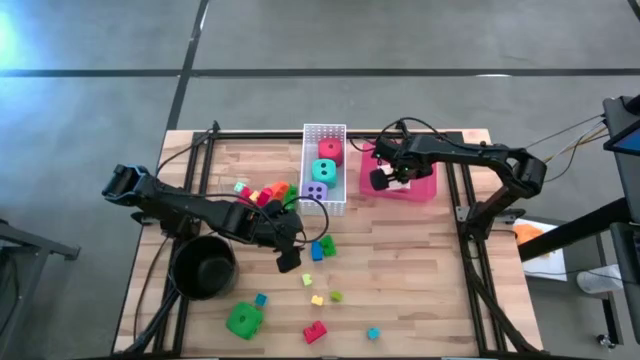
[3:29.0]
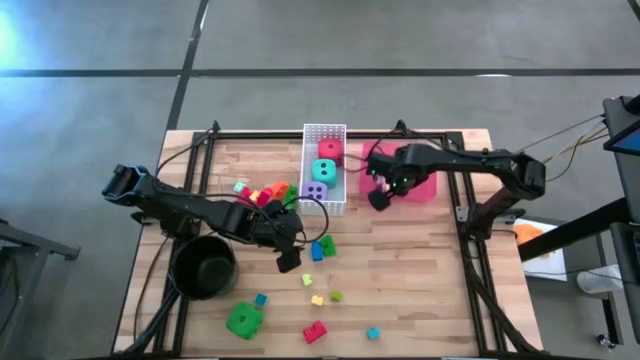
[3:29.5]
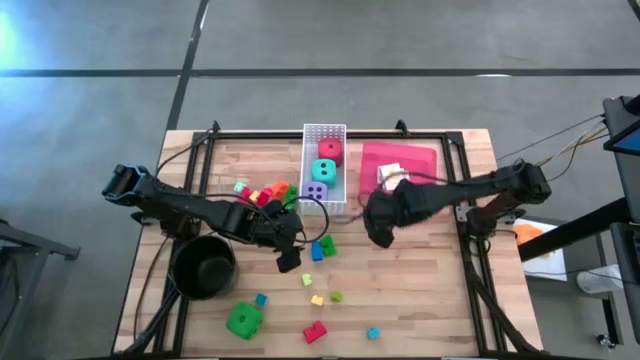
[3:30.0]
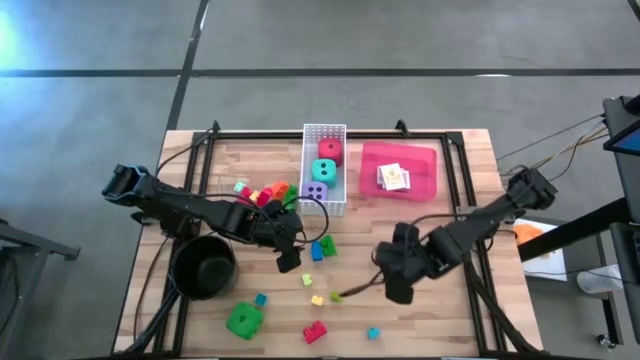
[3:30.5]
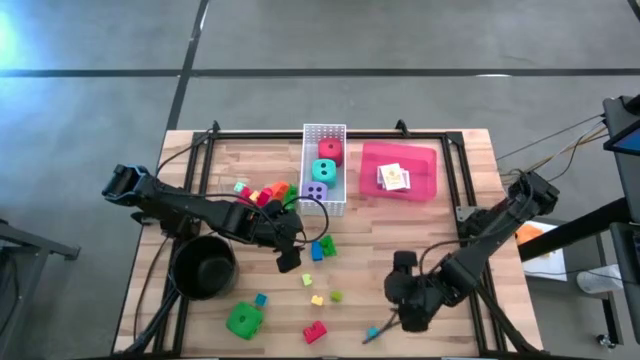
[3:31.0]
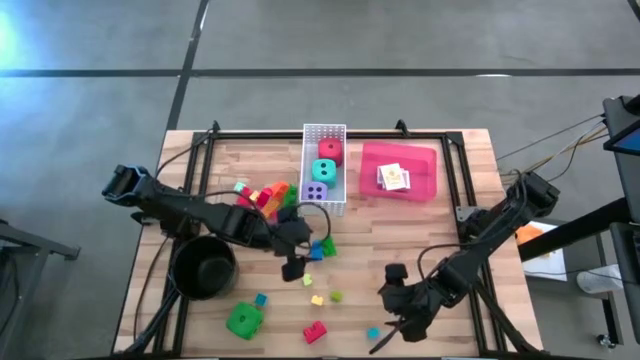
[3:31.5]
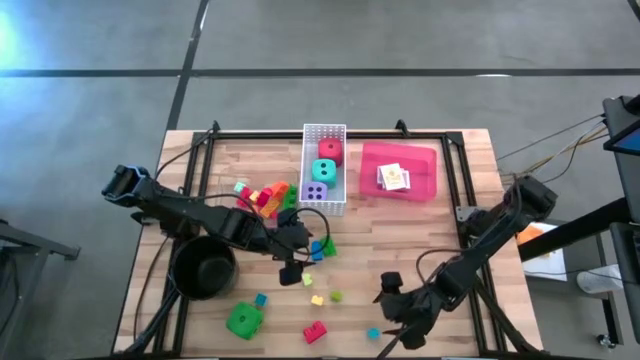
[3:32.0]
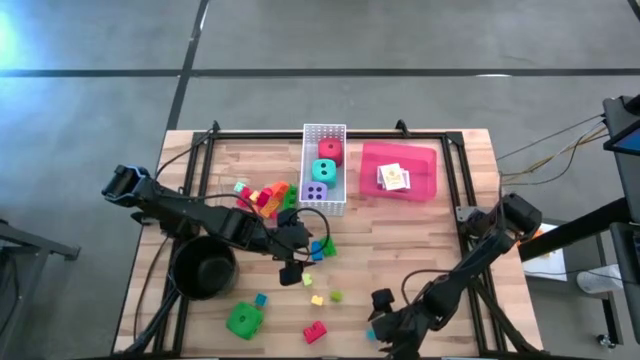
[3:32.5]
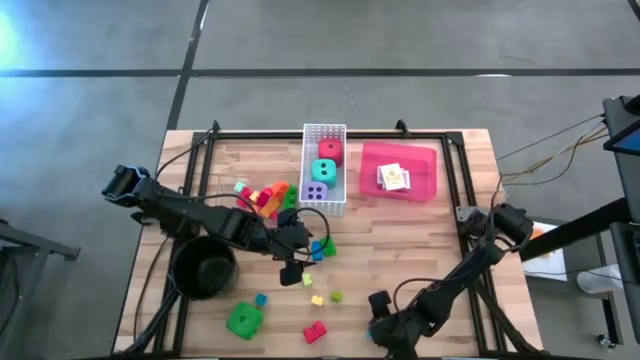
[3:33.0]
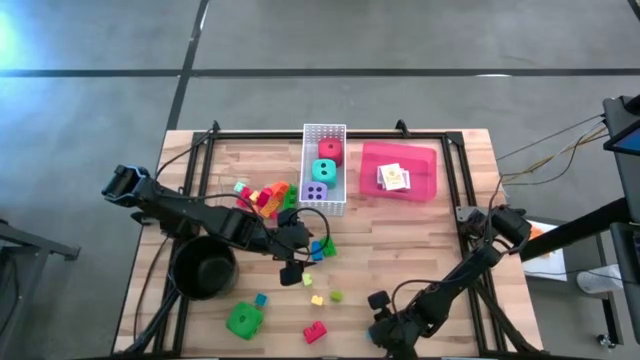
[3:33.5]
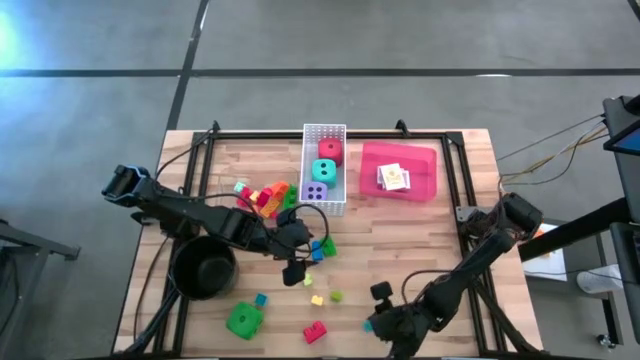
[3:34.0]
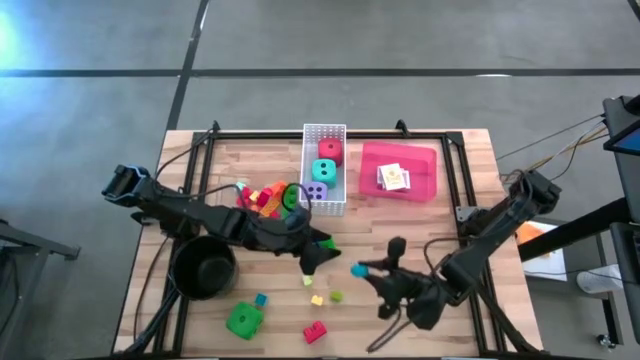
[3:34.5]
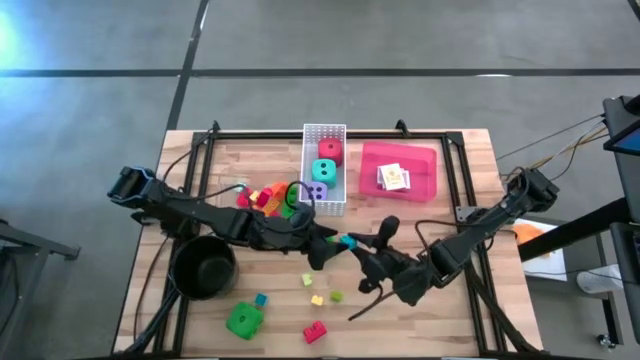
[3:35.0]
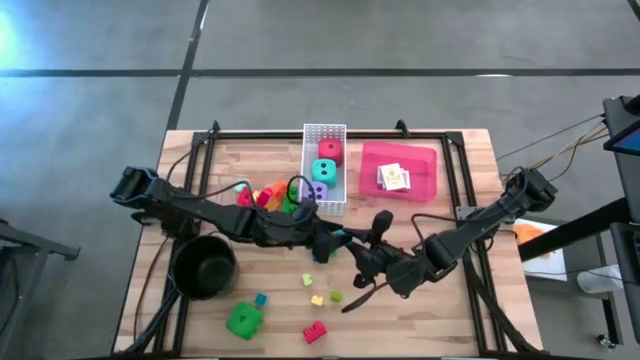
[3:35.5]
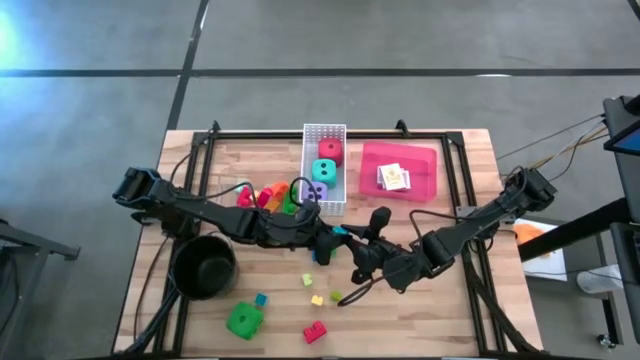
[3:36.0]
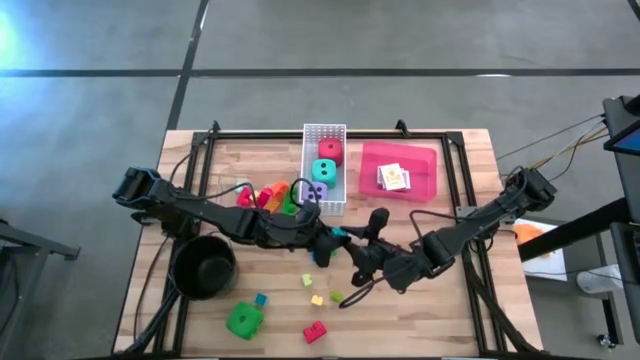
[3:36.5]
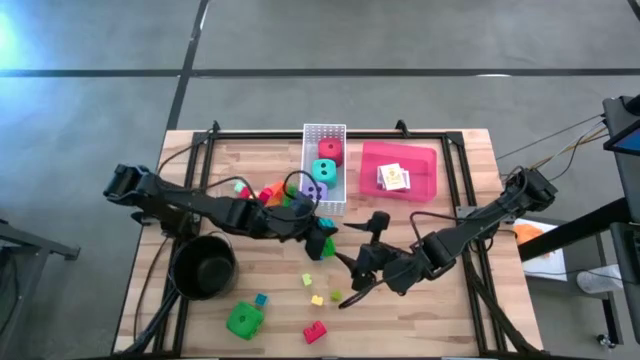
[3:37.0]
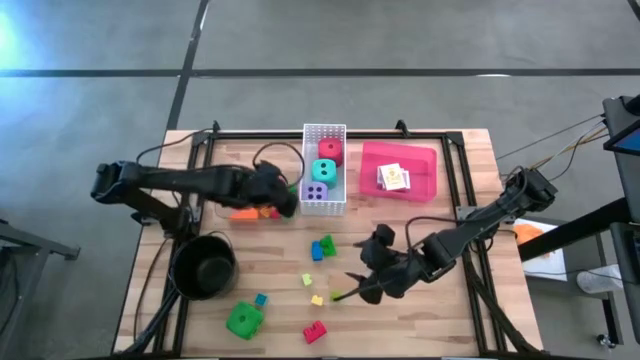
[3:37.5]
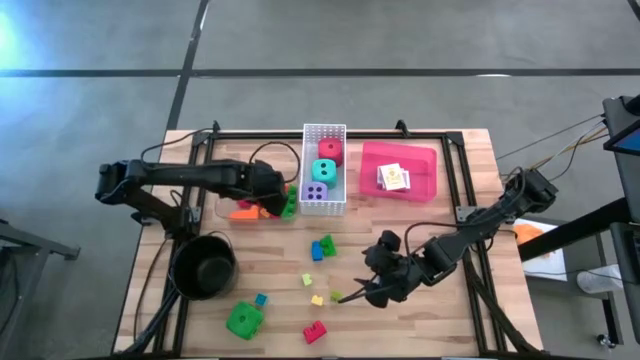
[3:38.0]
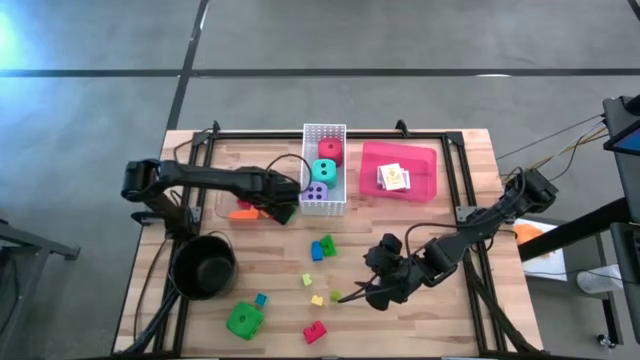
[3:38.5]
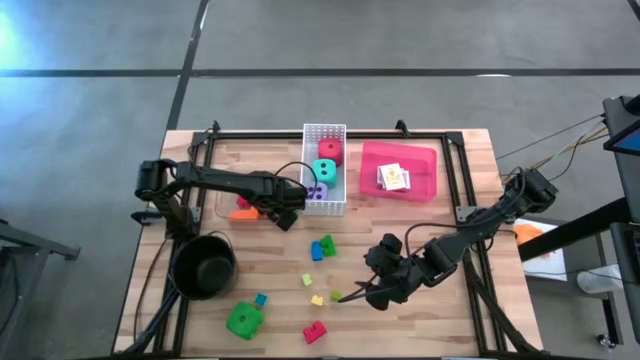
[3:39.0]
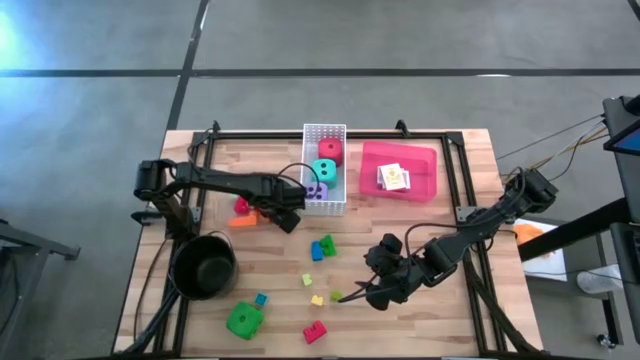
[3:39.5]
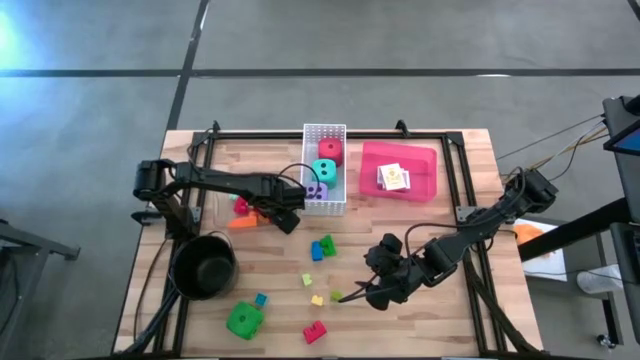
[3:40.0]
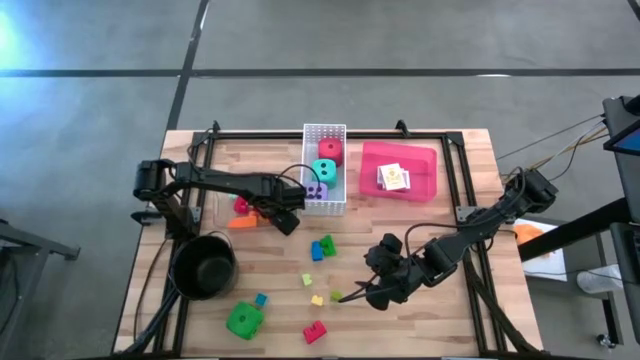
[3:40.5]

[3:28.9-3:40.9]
Task: Pick & Place Toys
Put the light blue game piece into the transparent bin

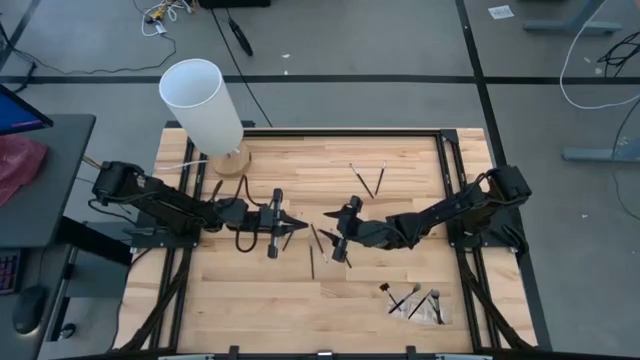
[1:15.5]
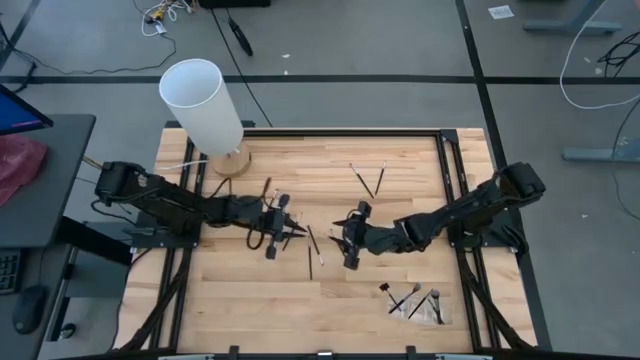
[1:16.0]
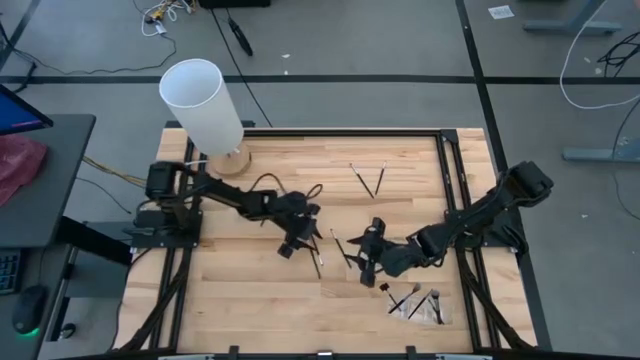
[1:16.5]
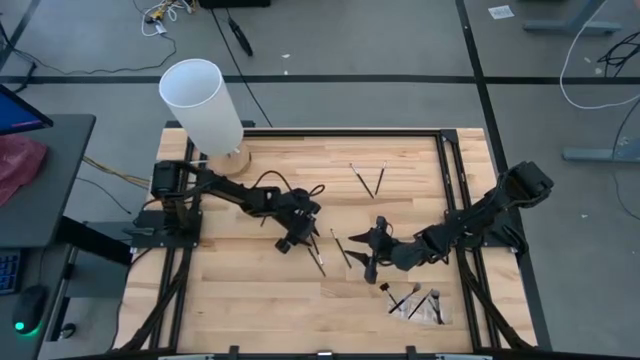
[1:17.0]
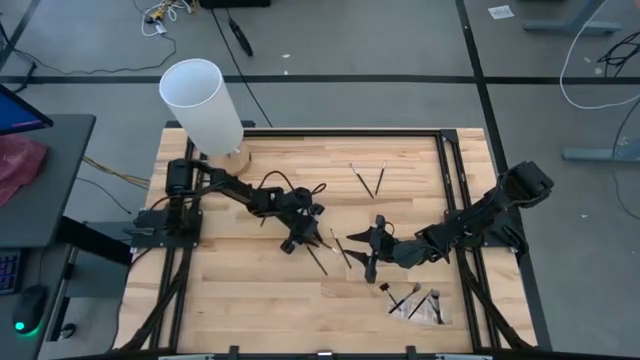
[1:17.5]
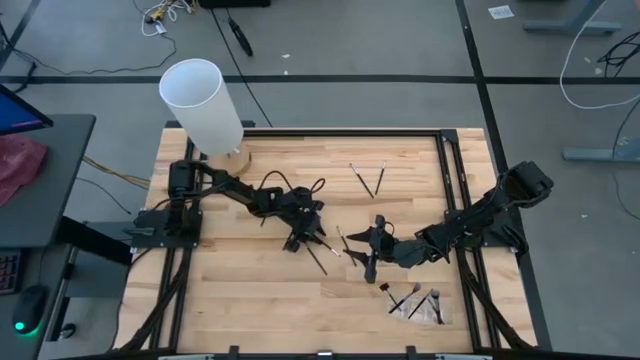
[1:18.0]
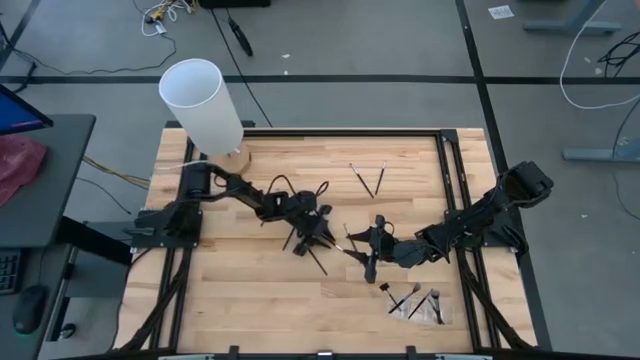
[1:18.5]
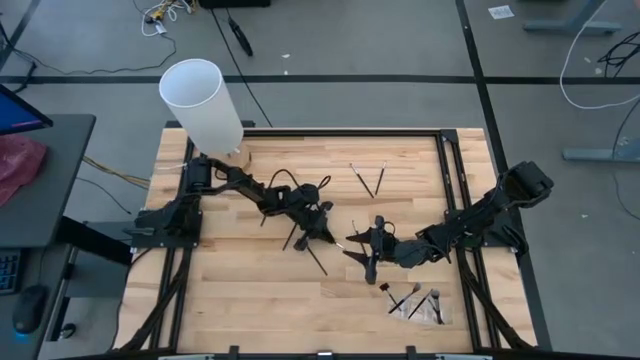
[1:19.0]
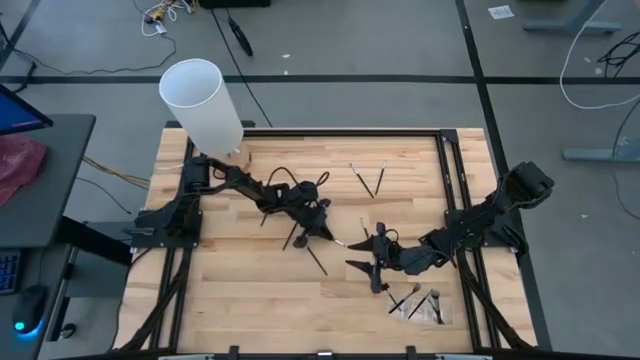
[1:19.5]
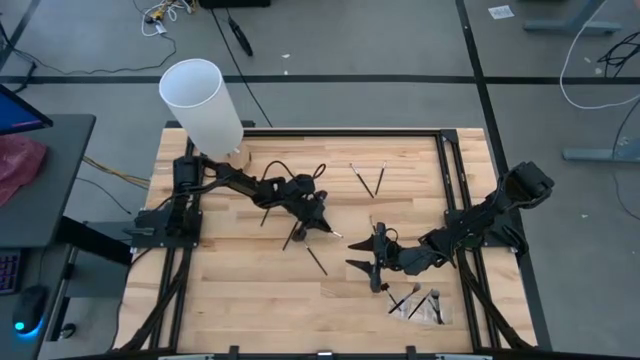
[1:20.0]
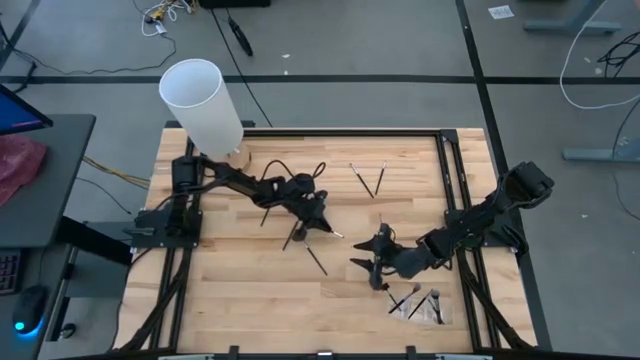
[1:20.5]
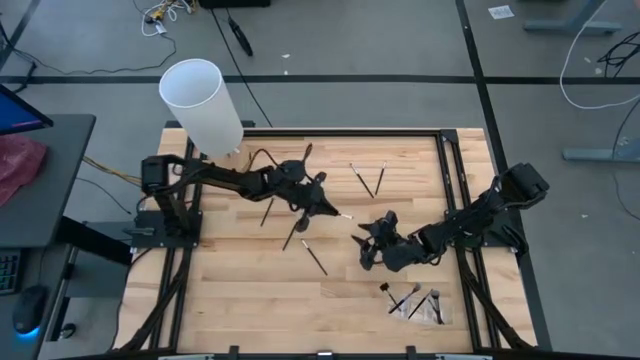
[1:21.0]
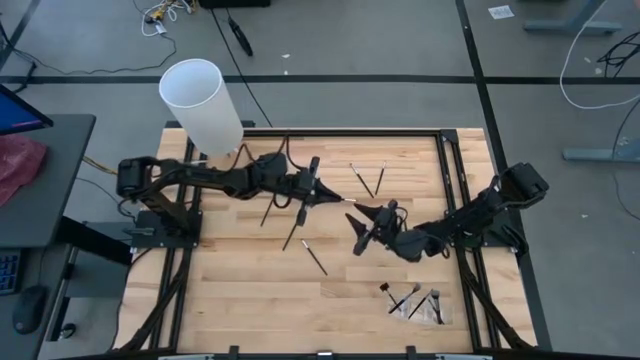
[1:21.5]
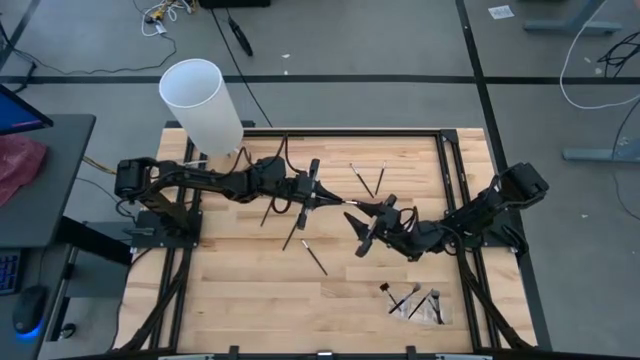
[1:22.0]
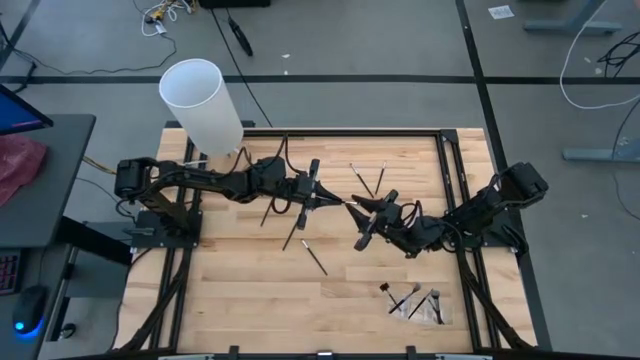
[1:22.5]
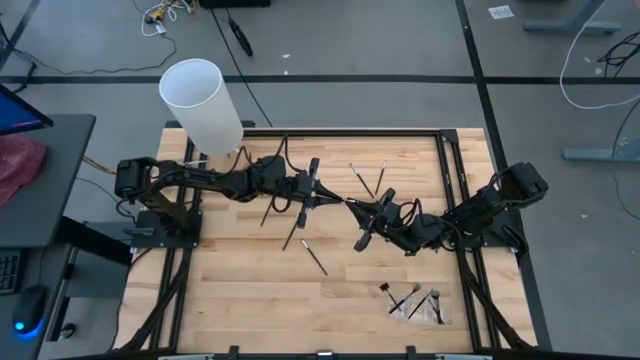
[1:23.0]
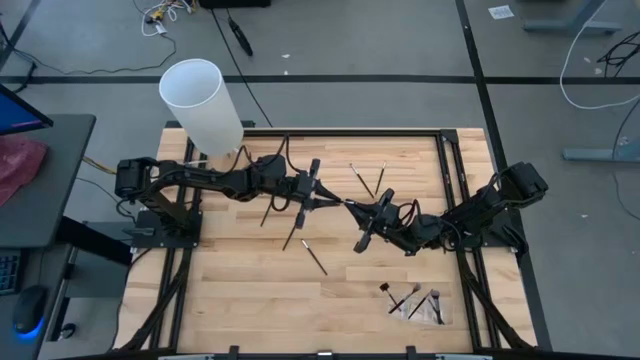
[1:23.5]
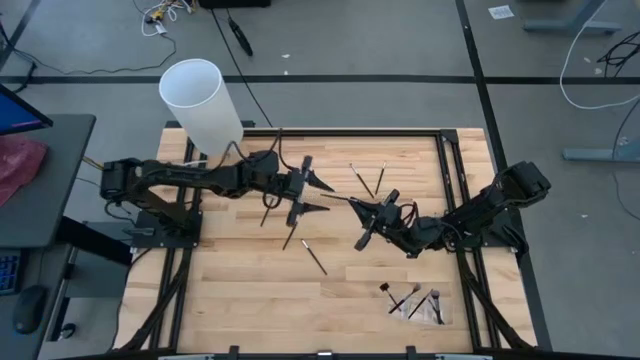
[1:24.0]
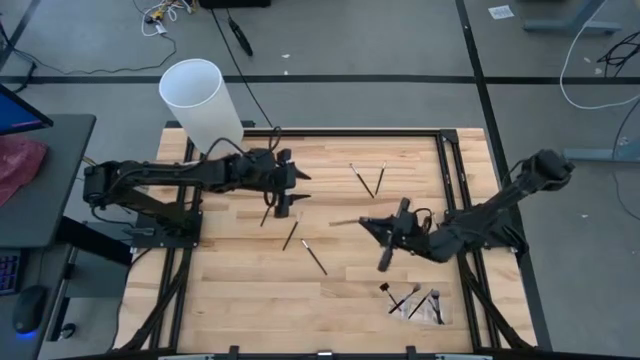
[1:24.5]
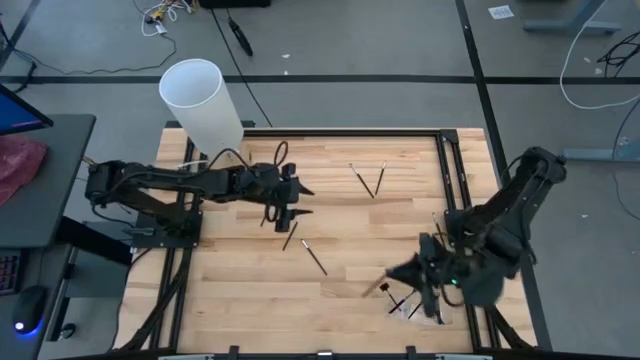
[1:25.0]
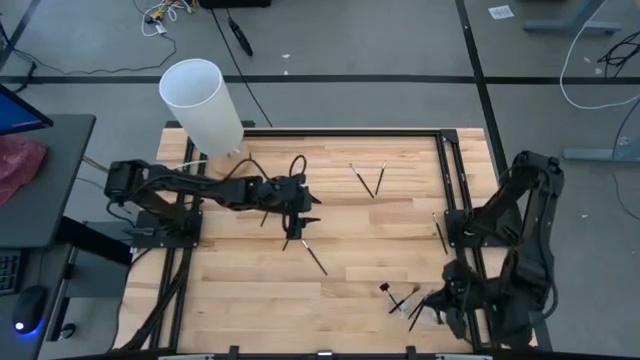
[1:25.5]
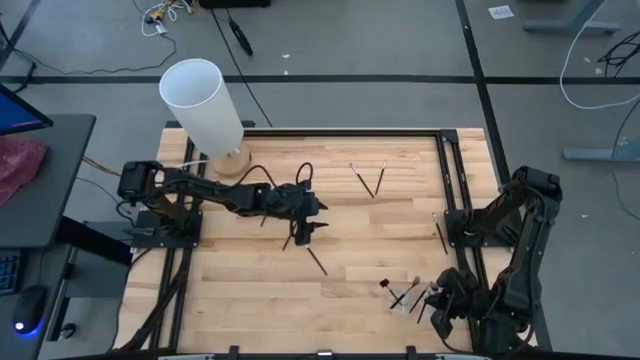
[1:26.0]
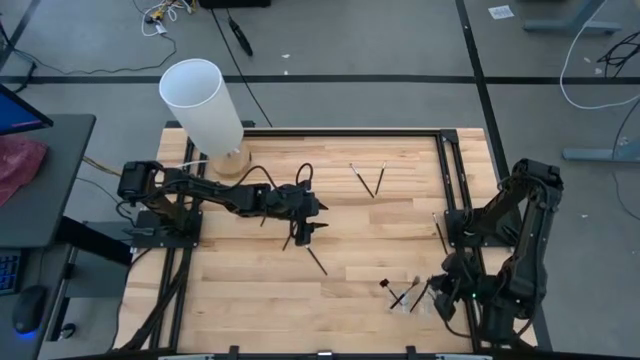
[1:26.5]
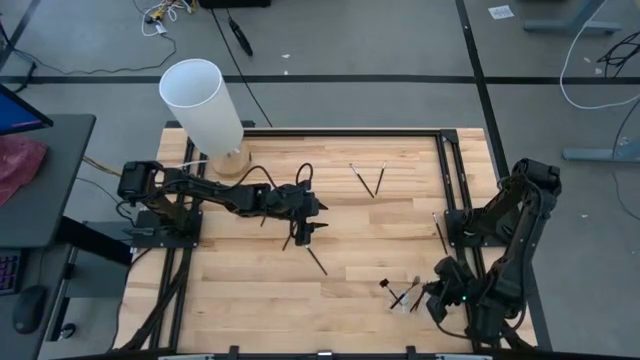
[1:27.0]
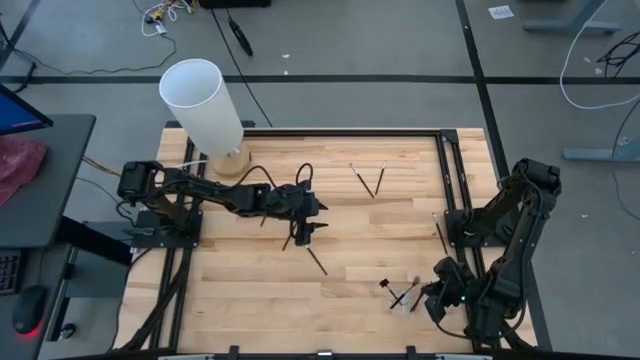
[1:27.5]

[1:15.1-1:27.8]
Task: Pick & Place Makeup Supplies
Put the silver makeup brush into the transparent organizer
